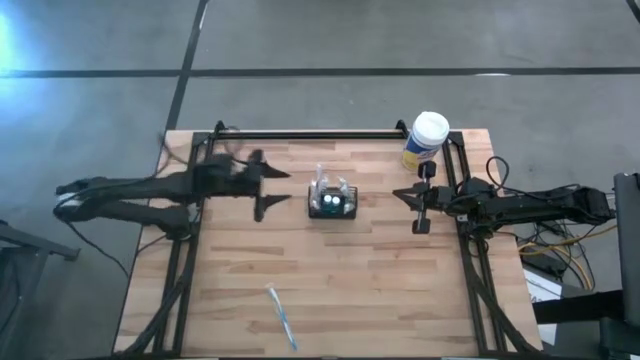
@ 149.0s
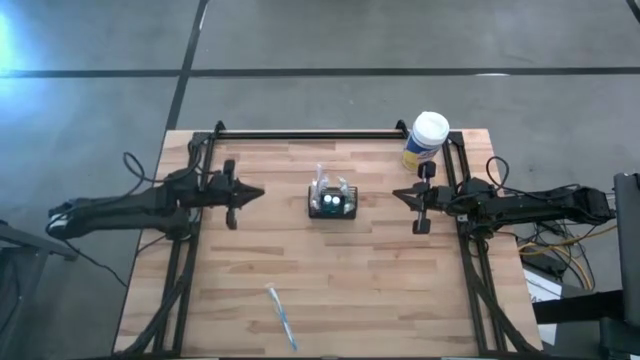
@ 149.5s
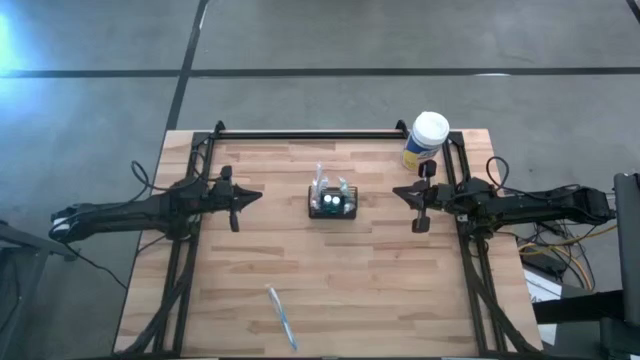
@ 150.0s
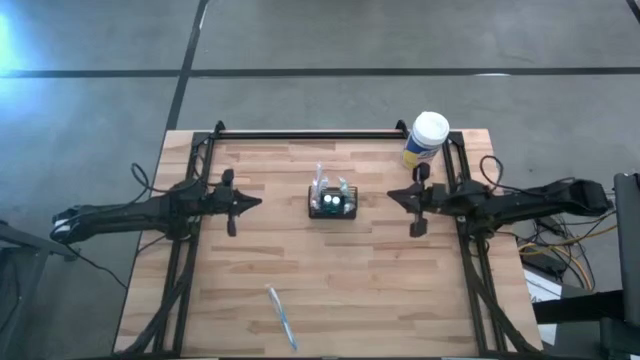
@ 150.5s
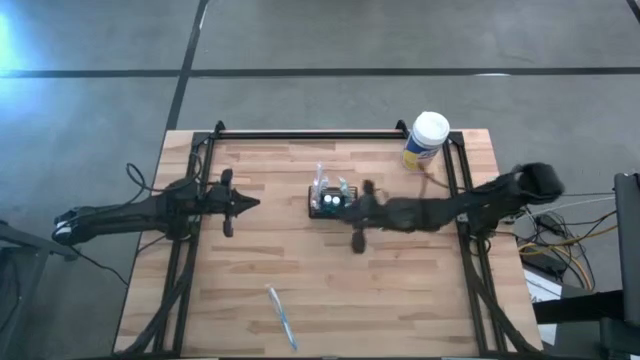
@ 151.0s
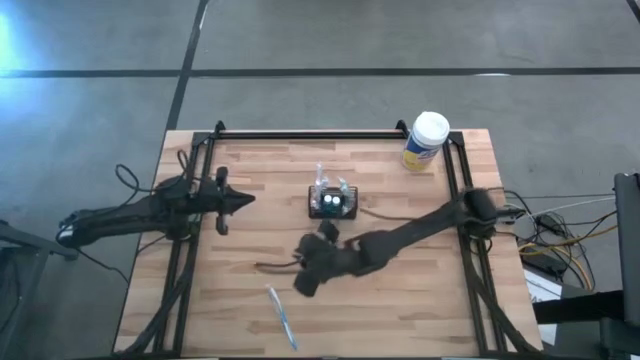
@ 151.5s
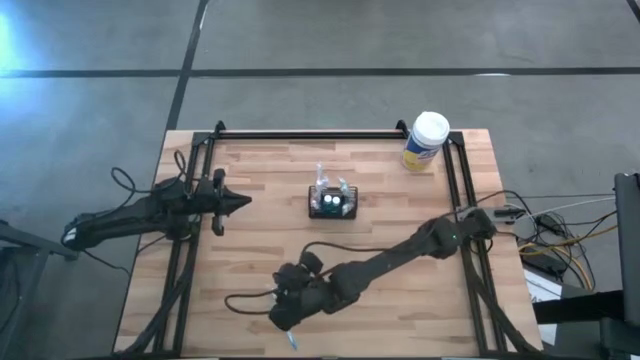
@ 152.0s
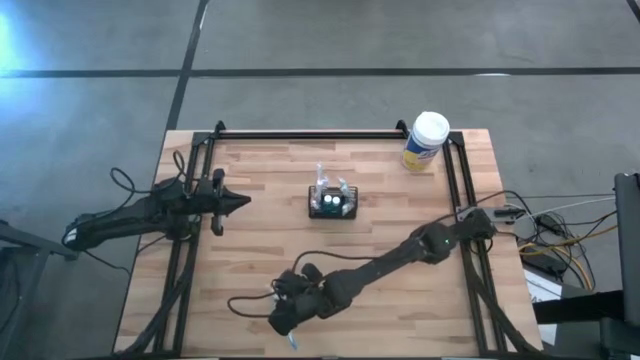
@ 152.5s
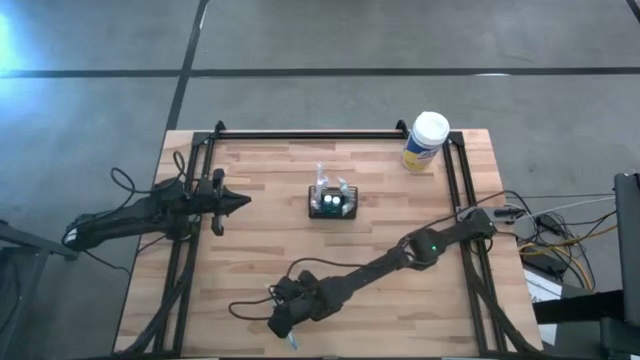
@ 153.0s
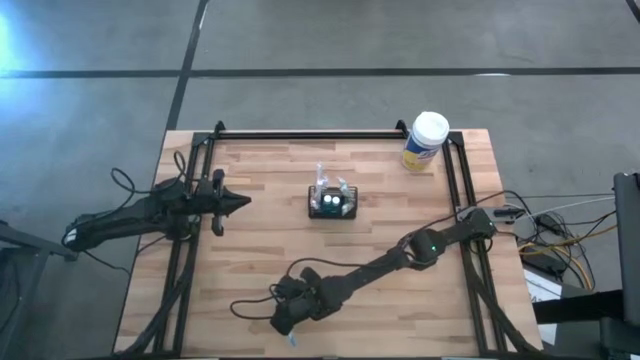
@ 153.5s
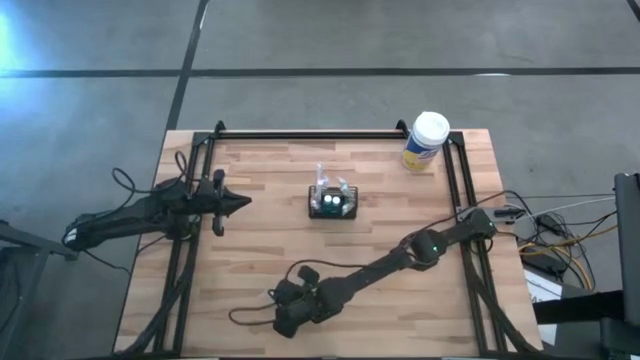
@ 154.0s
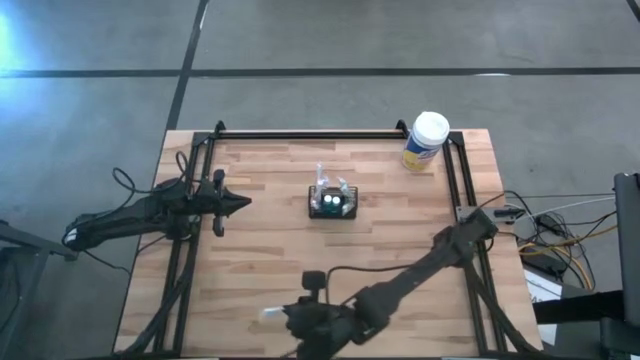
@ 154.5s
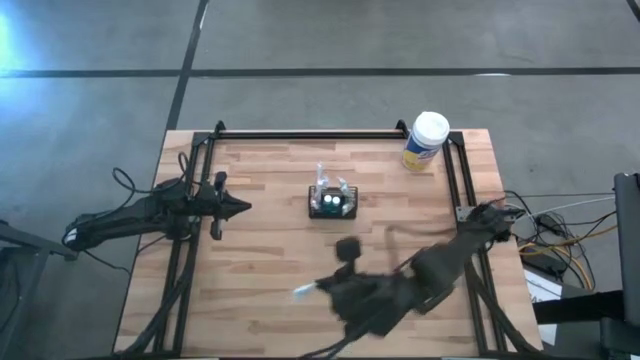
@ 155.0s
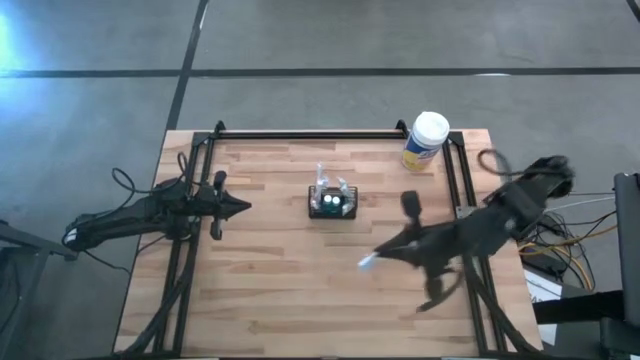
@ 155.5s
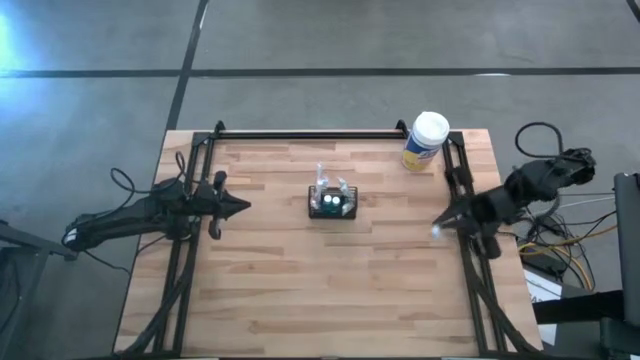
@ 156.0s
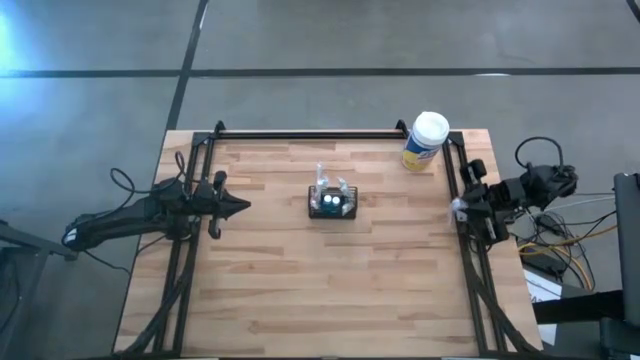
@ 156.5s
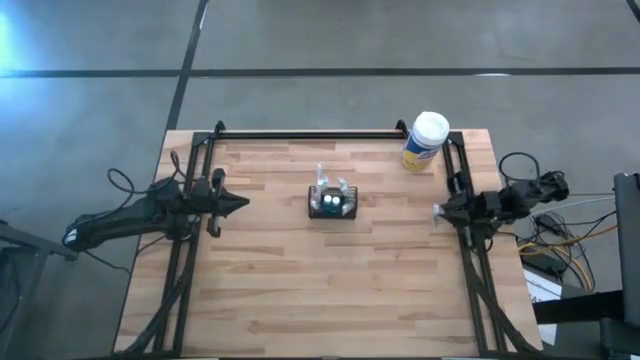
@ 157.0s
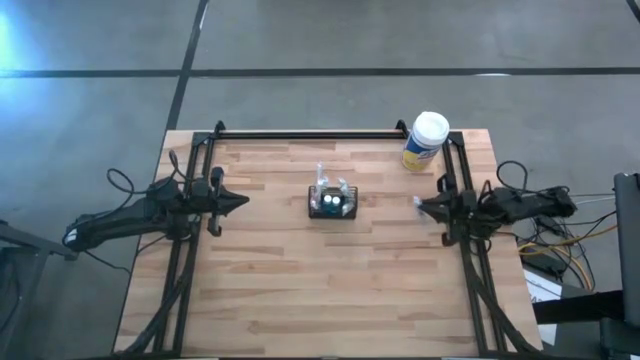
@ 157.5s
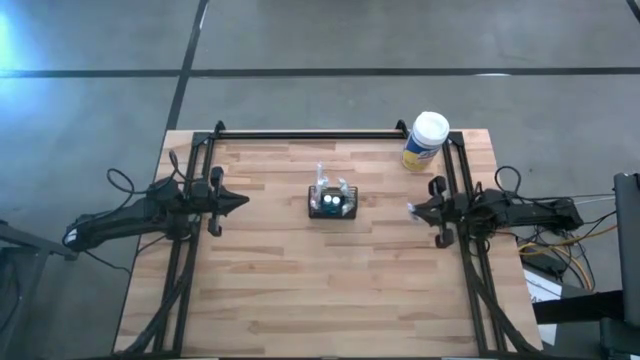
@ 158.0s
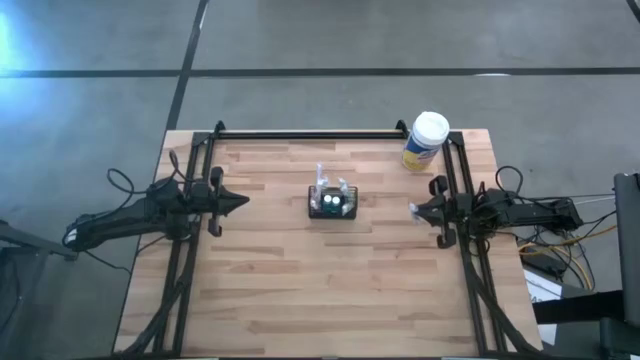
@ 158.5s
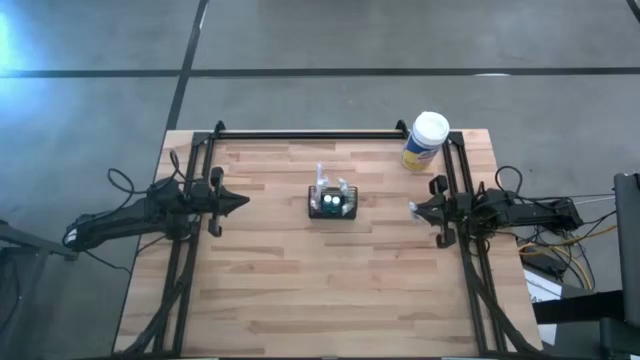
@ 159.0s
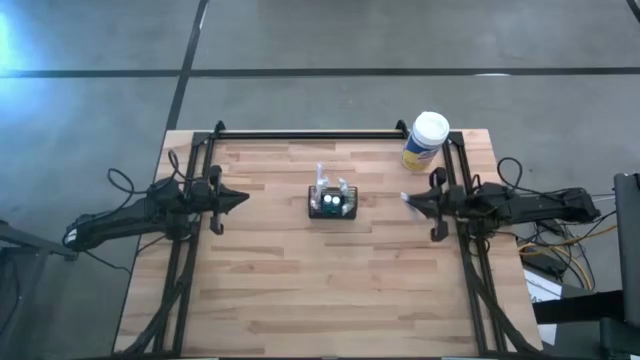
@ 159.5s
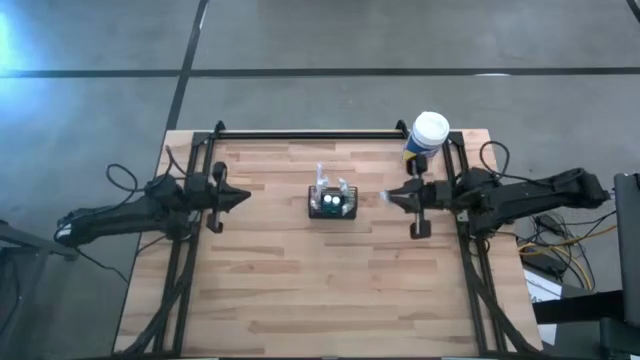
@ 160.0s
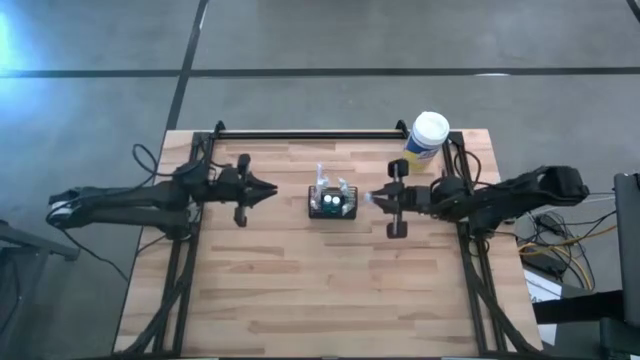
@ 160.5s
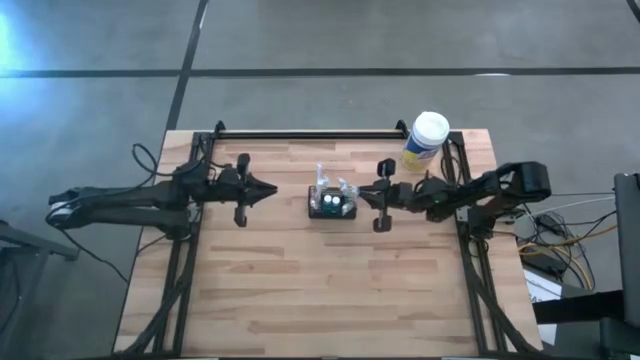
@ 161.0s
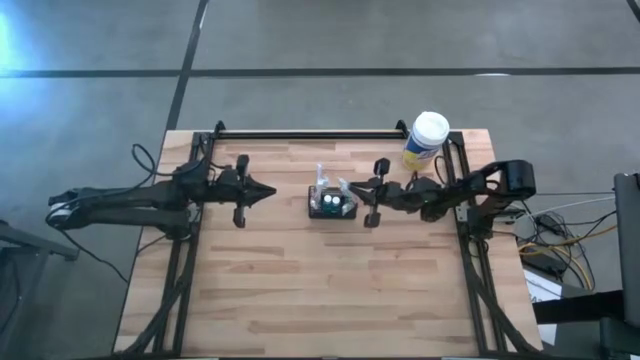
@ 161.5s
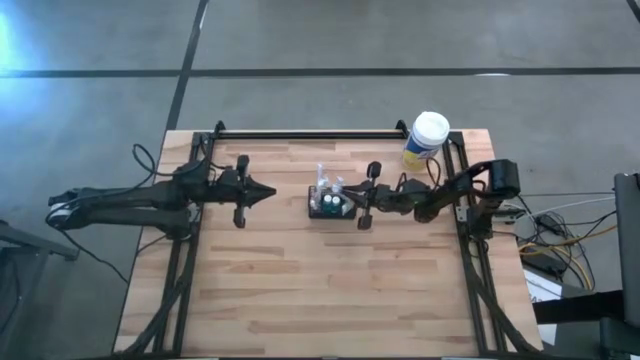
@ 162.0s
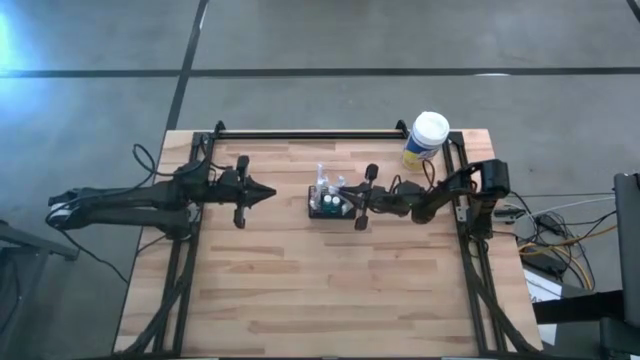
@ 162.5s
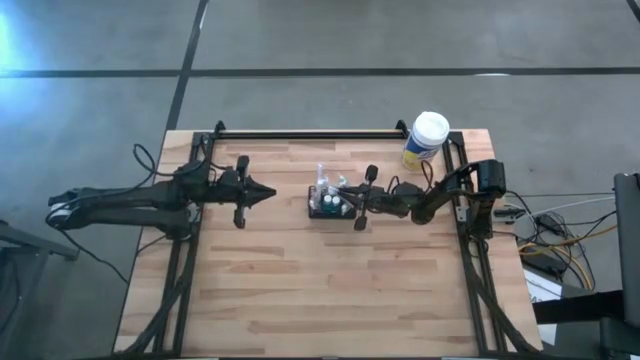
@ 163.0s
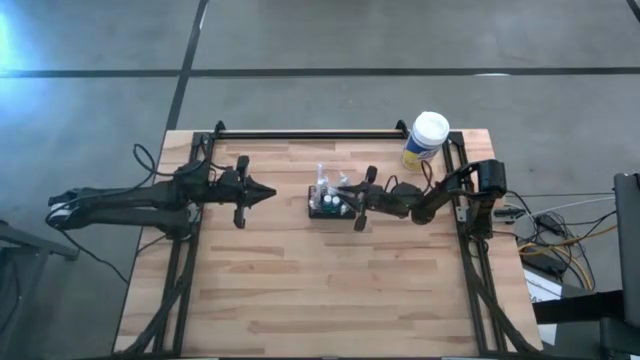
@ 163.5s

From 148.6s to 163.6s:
Task: Pick & Place toothbrushing station
Put the blue toothbrush into the black organizer

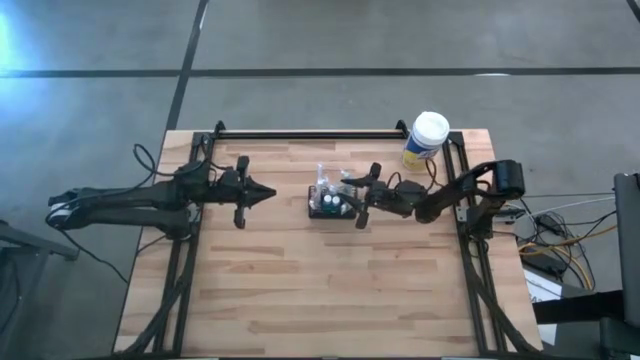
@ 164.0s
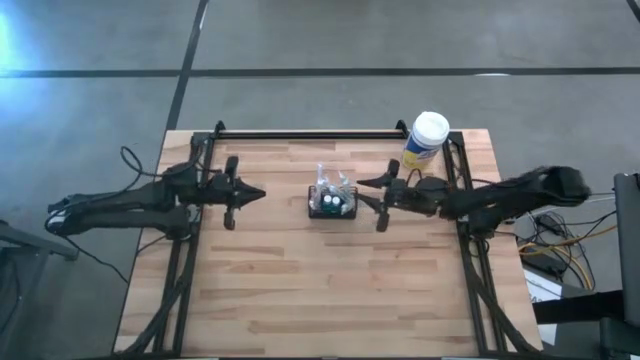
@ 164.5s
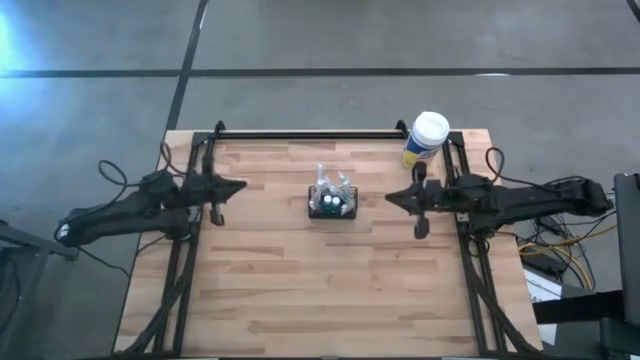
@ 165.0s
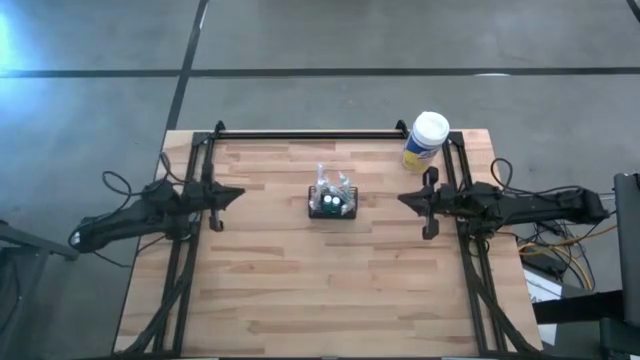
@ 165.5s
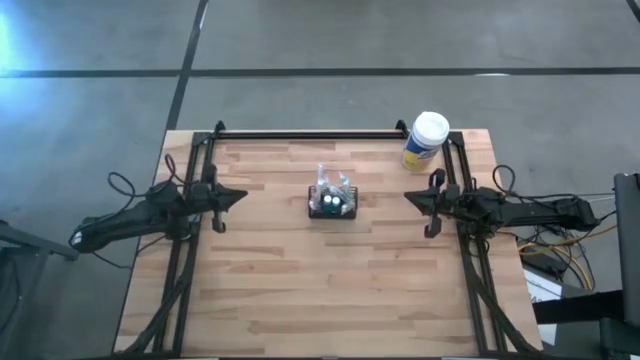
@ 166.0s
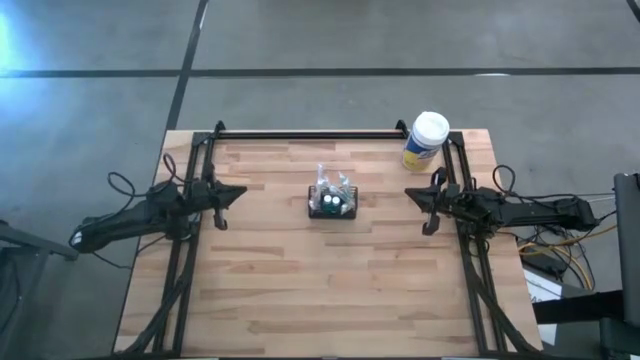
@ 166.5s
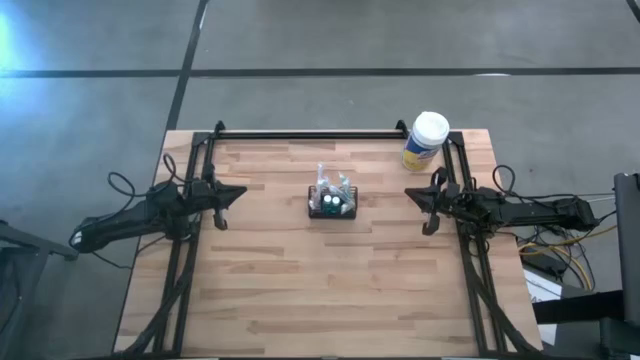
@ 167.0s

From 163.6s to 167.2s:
Return to Home Position

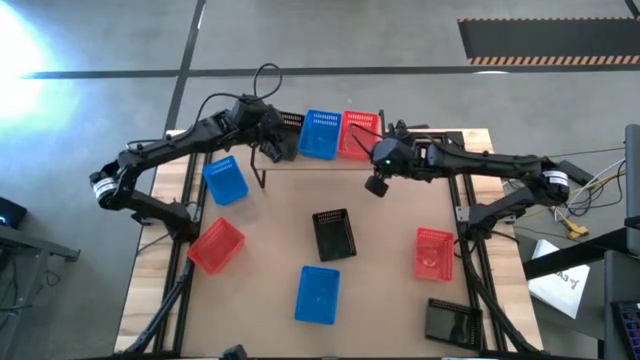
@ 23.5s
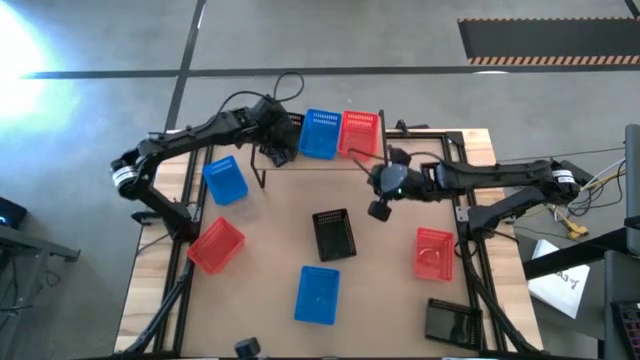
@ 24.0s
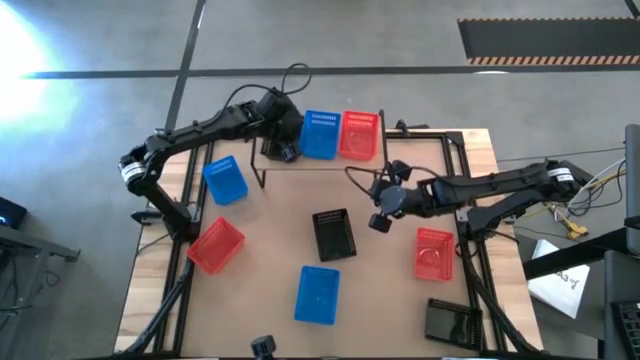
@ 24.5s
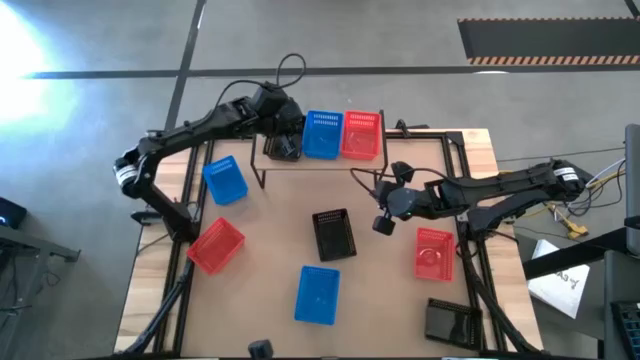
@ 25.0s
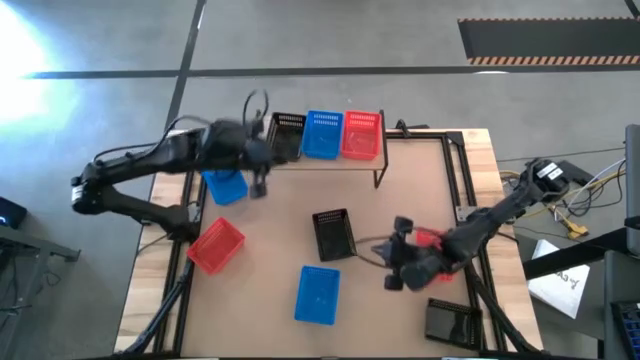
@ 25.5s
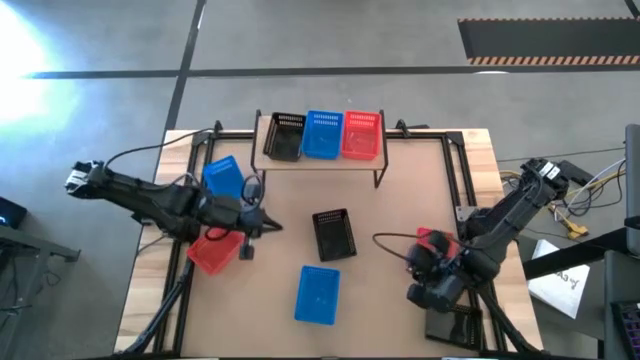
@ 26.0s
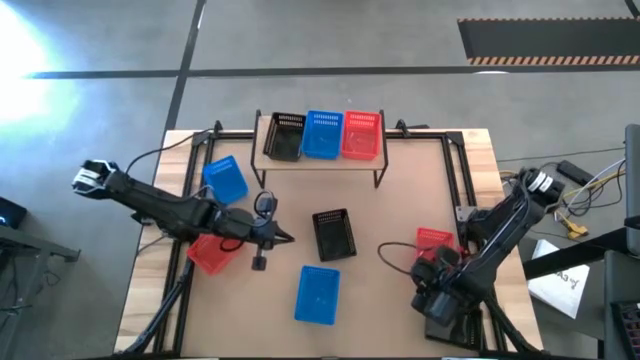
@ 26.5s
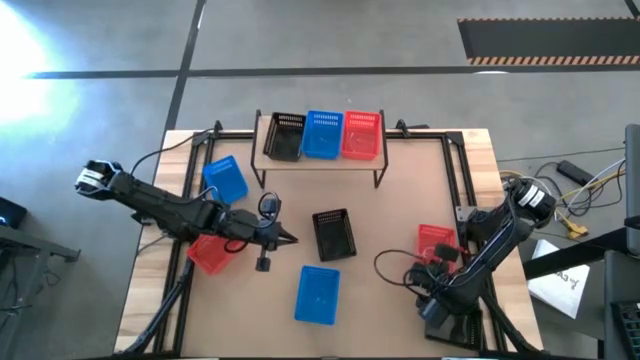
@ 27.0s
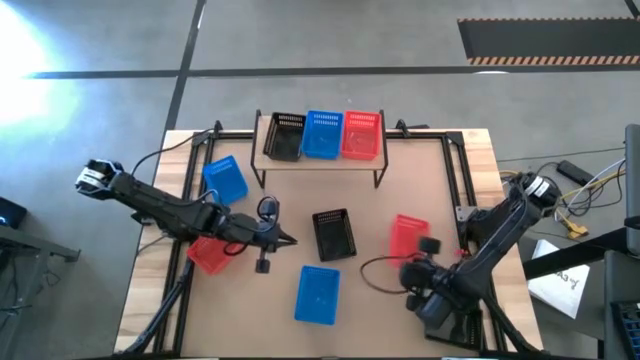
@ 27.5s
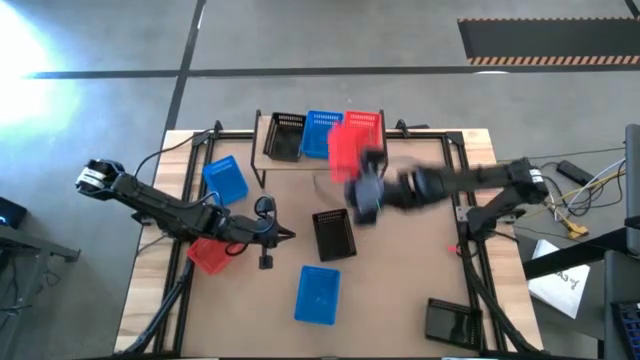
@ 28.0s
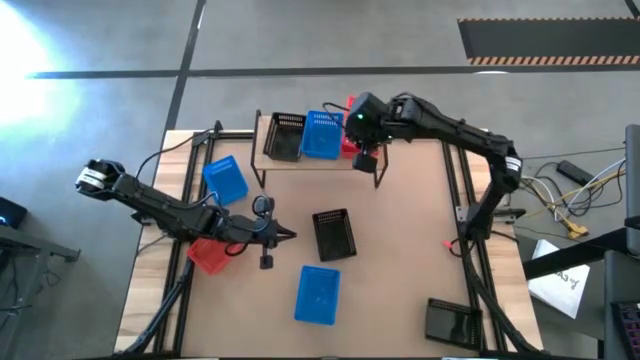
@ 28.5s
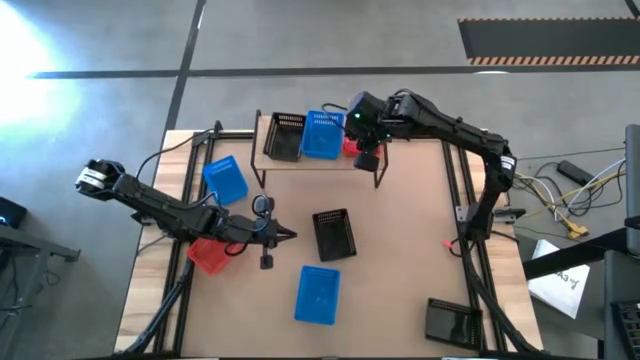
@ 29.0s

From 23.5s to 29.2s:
Task: Stack baskets on shelf by color
Stack the right red bin on the red bin on the shelf
